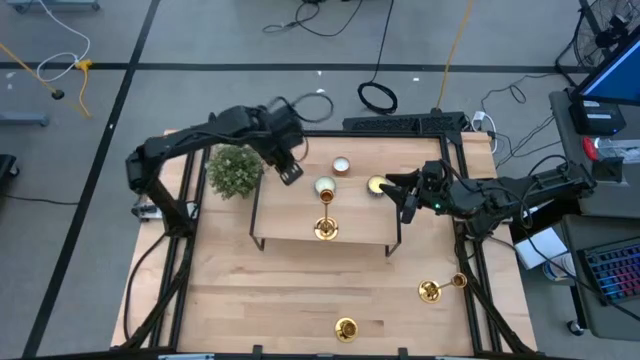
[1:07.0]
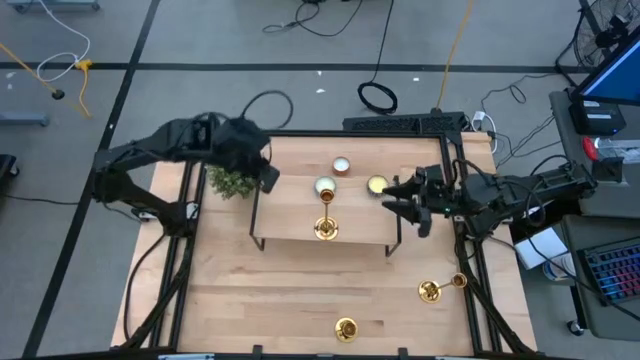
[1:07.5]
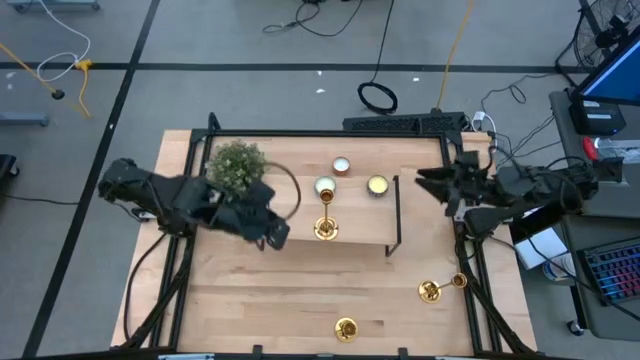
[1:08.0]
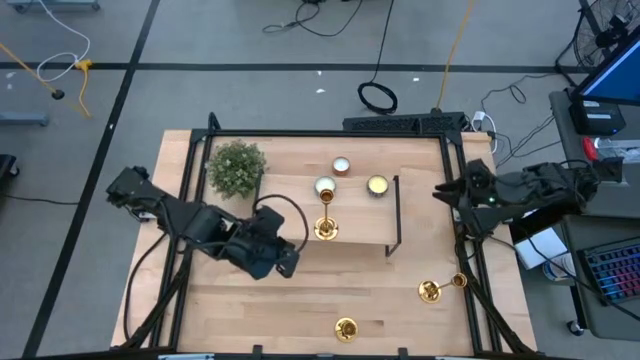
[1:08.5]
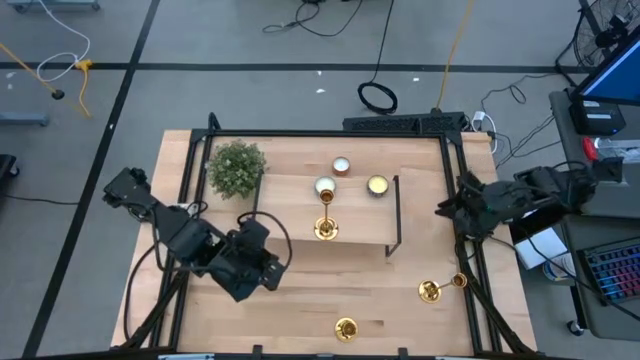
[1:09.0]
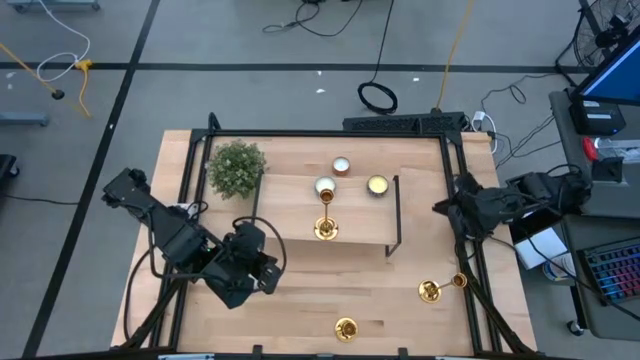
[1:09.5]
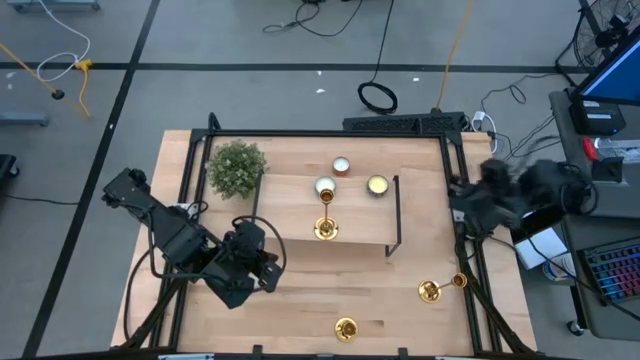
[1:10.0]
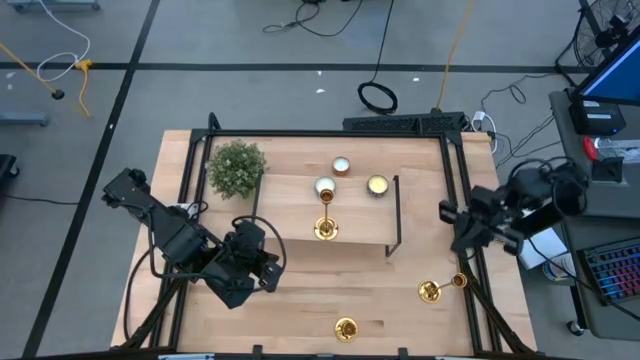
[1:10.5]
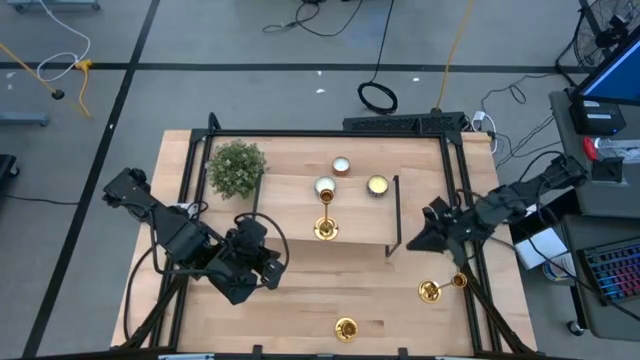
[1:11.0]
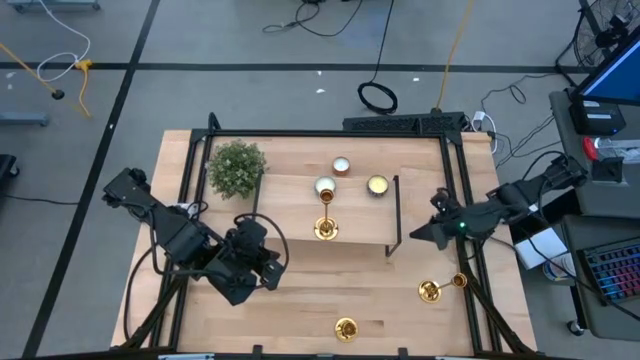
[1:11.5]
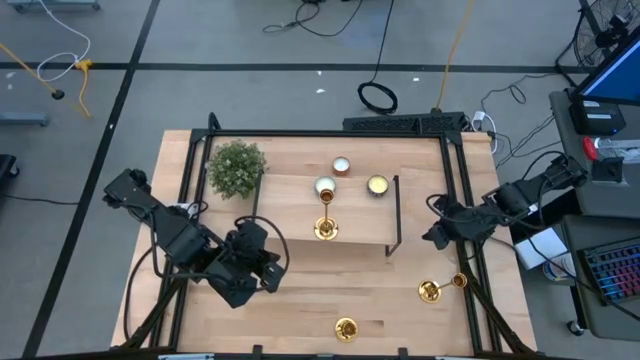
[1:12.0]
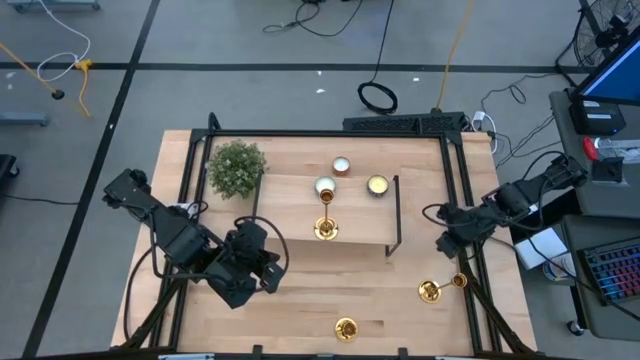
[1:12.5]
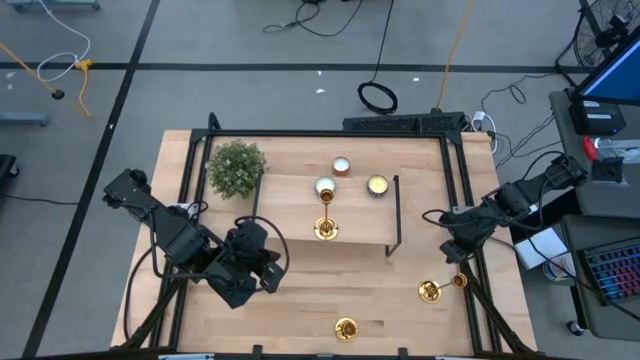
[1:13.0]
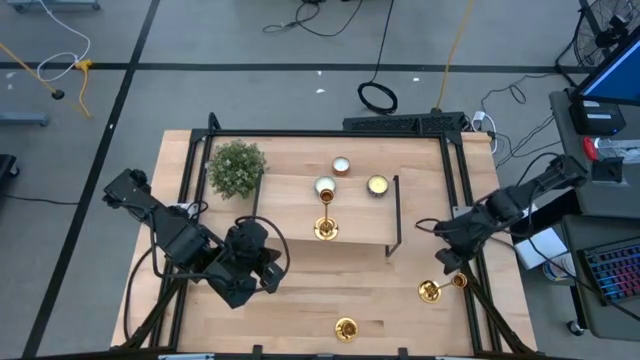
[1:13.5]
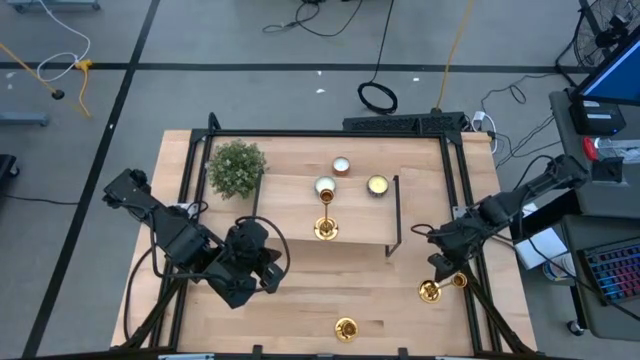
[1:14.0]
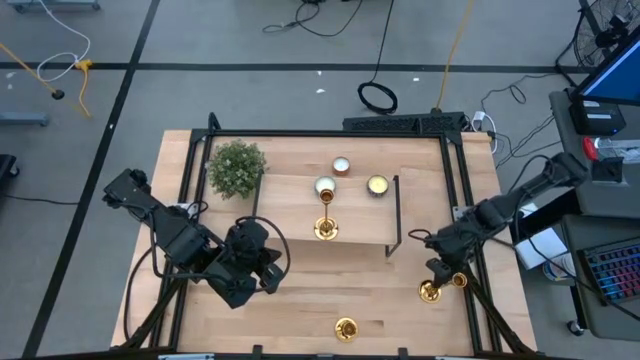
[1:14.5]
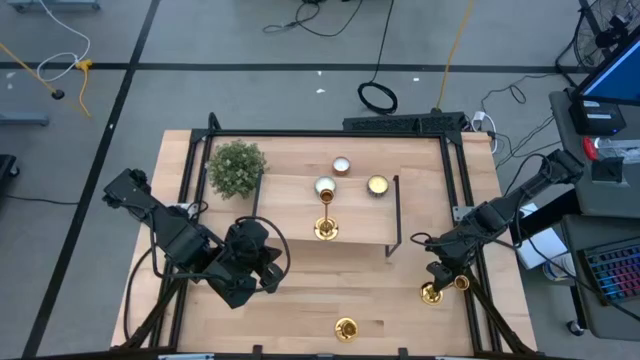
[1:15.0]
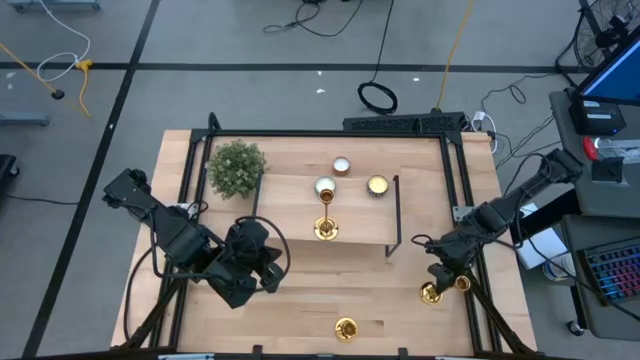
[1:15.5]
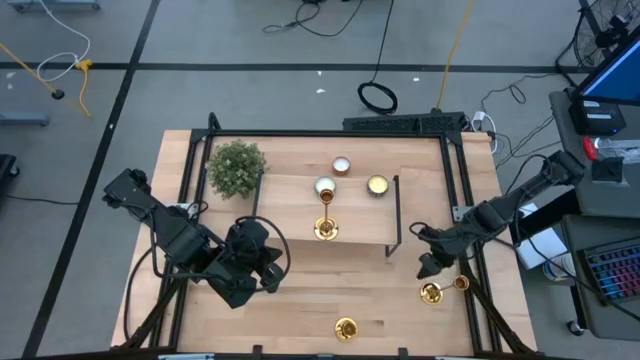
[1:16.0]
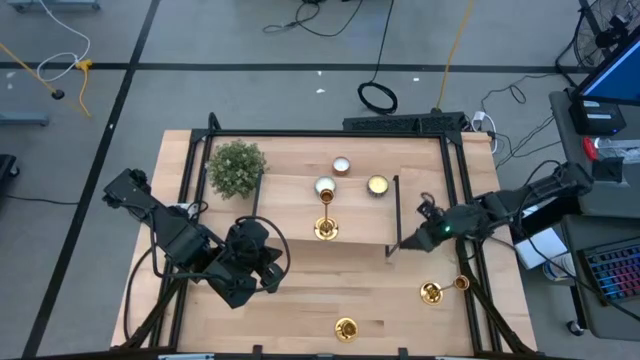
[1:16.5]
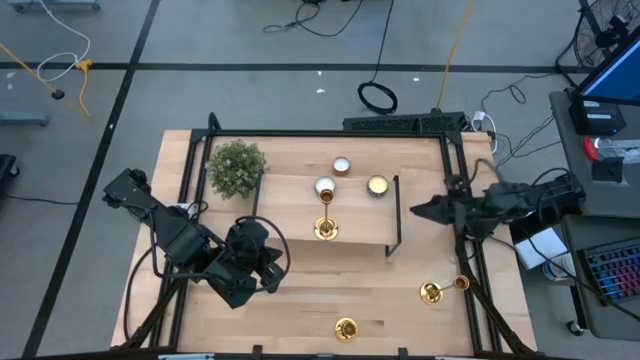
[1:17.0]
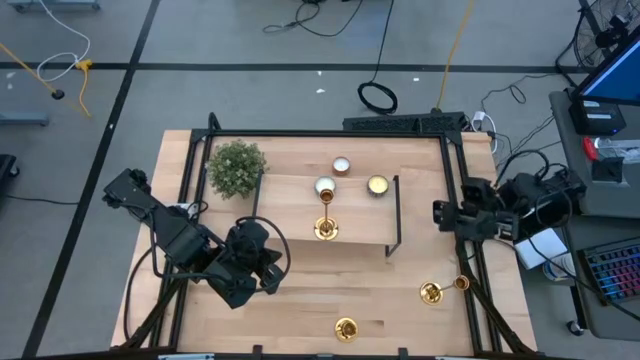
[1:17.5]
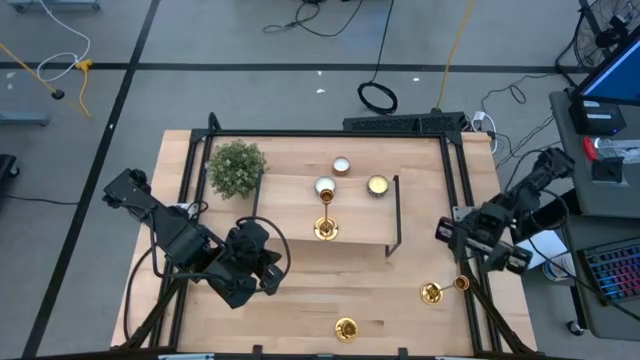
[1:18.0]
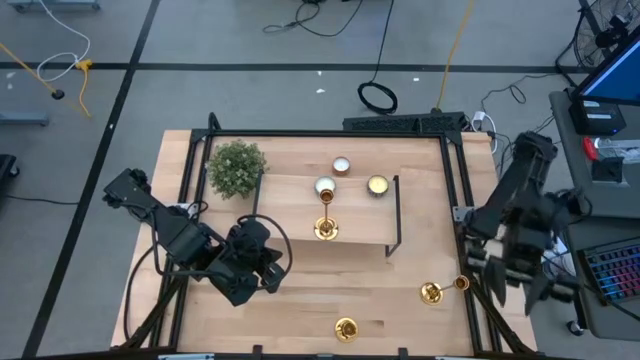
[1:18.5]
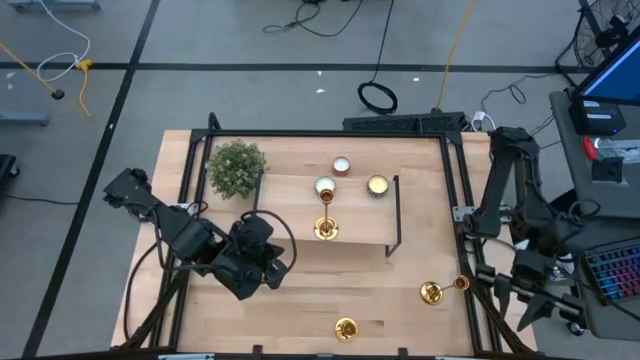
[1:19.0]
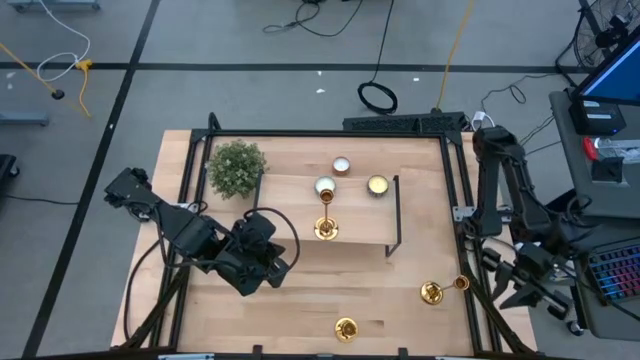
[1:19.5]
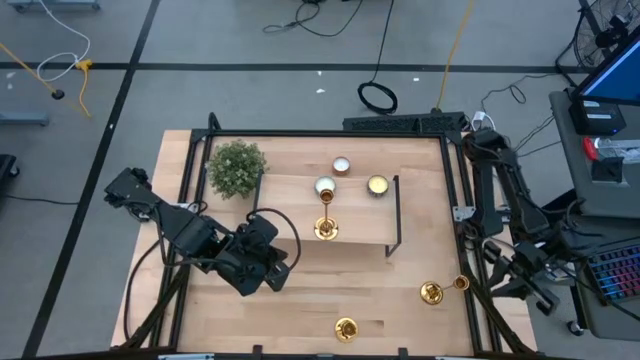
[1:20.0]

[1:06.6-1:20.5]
Task: Pick & Place candle stick holders
Put the right gold candle holder on the shelf
